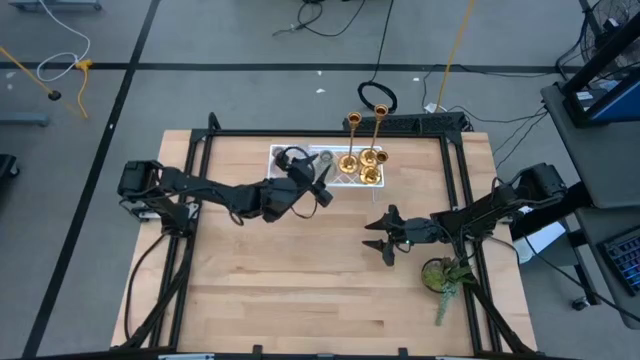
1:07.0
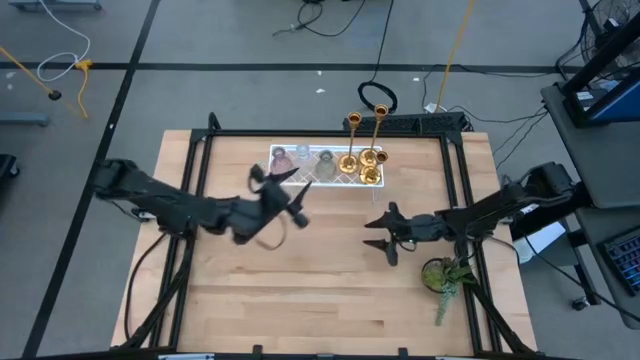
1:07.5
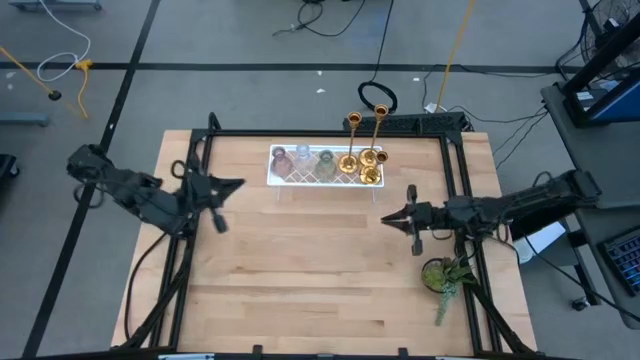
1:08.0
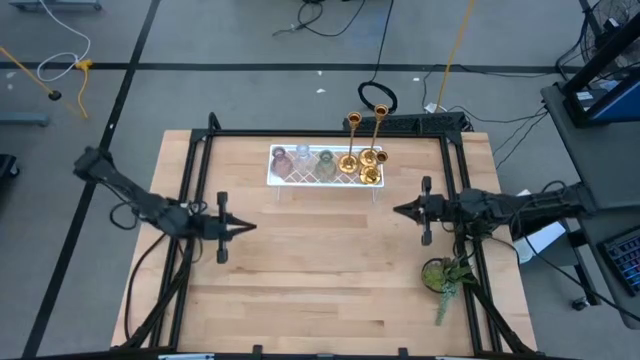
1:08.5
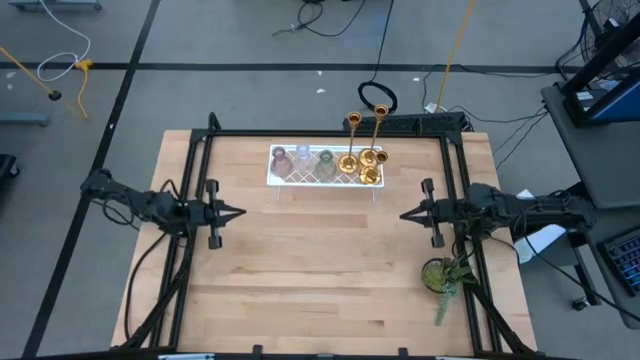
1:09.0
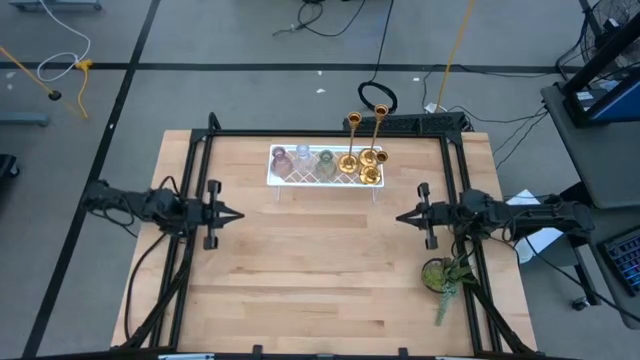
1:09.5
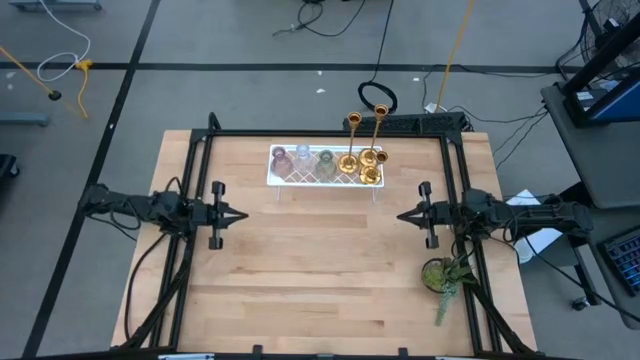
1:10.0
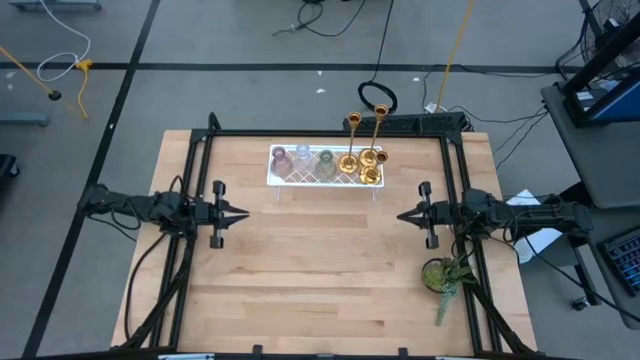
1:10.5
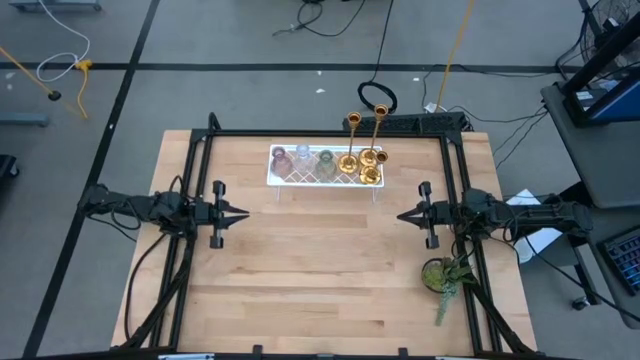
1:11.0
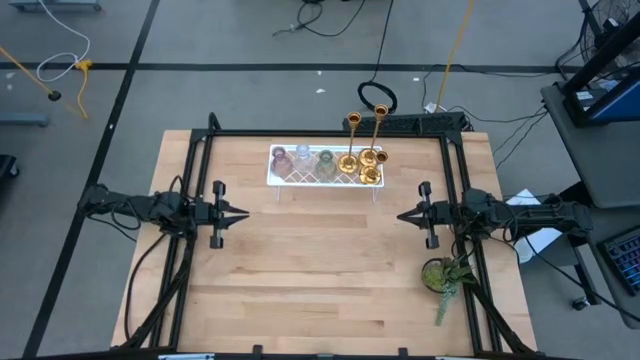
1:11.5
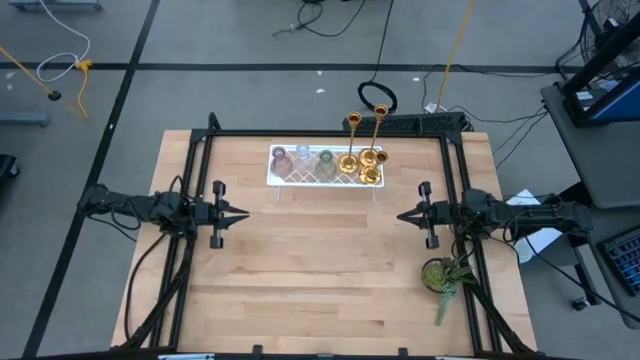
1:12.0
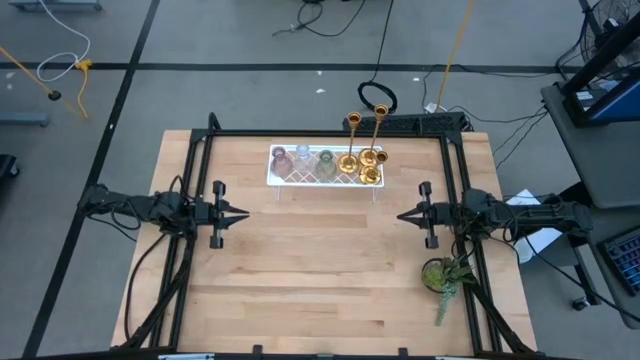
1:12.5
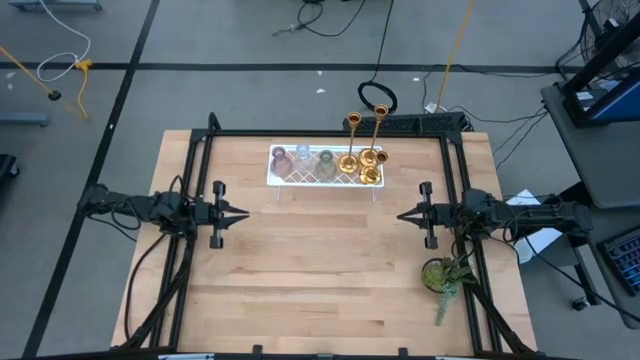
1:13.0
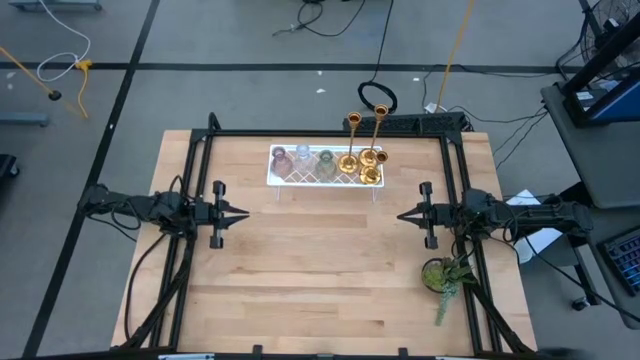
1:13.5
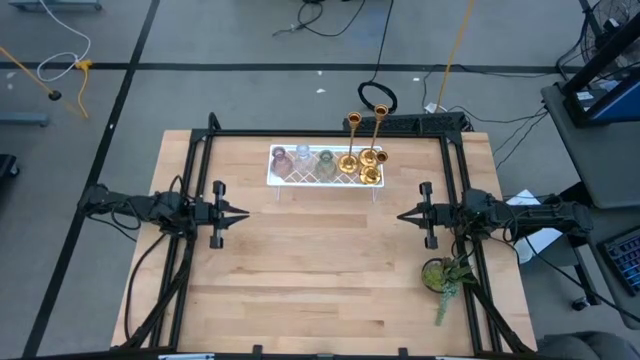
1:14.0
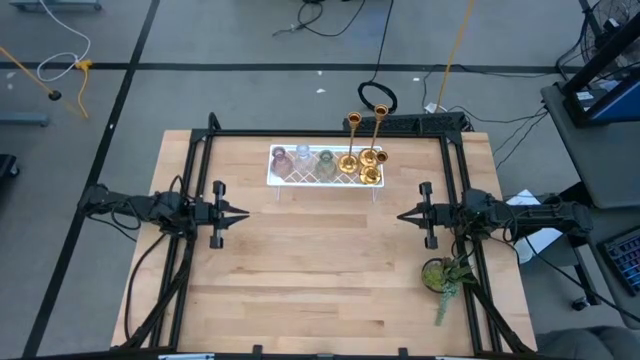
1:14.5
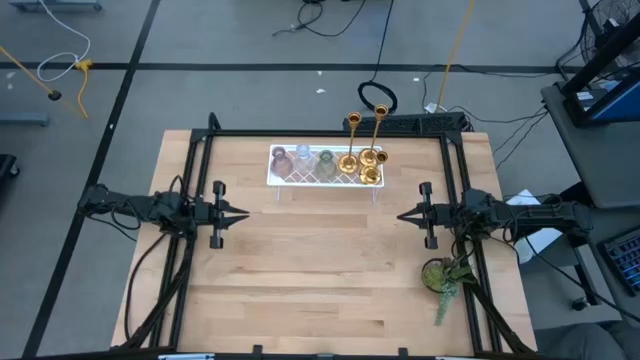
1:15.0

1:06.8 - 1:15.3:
Task: Pick & Place candle stick holders
Return to Home Position

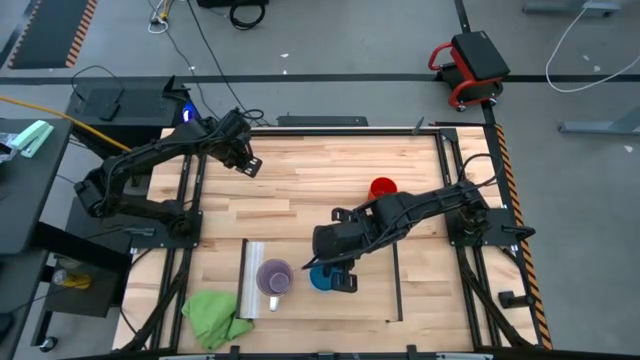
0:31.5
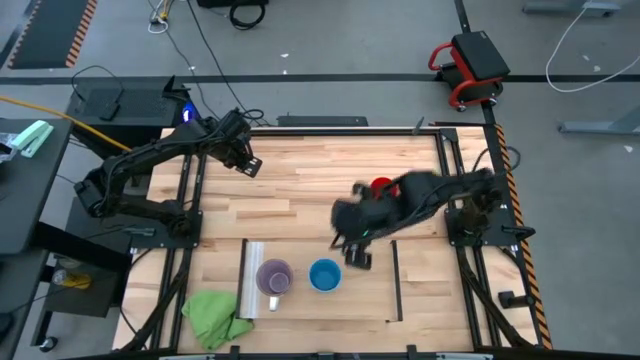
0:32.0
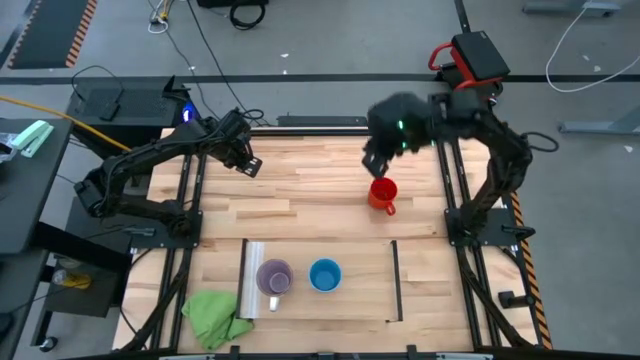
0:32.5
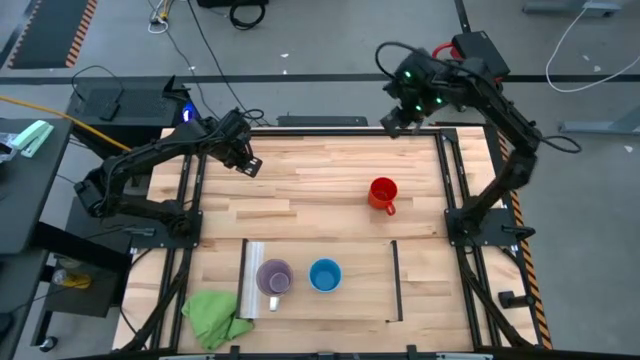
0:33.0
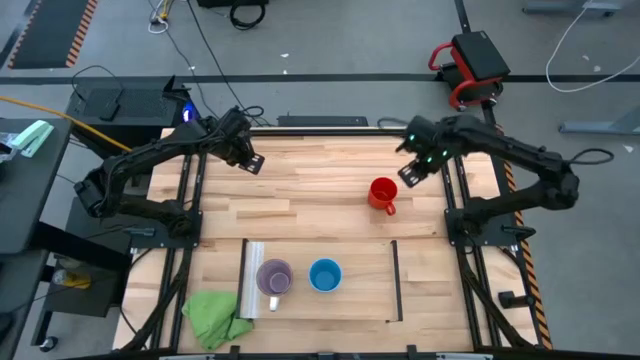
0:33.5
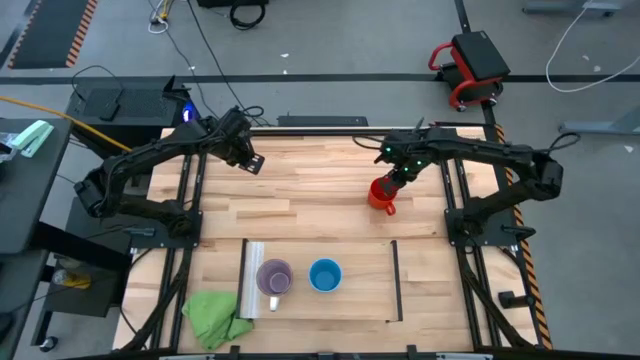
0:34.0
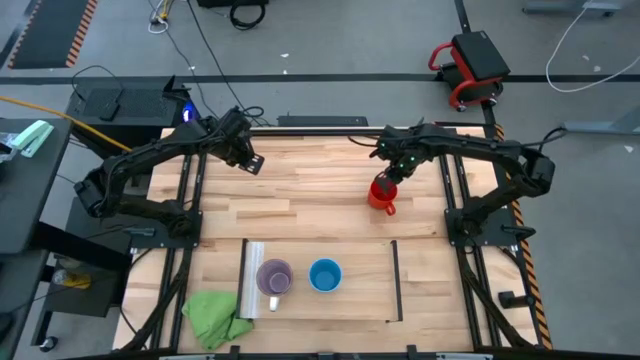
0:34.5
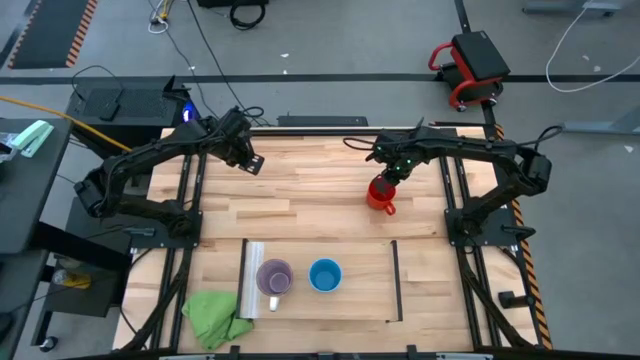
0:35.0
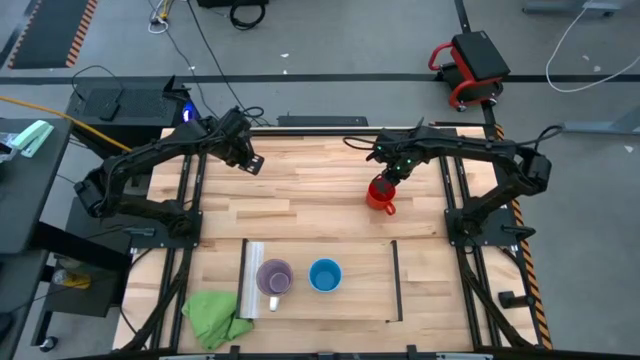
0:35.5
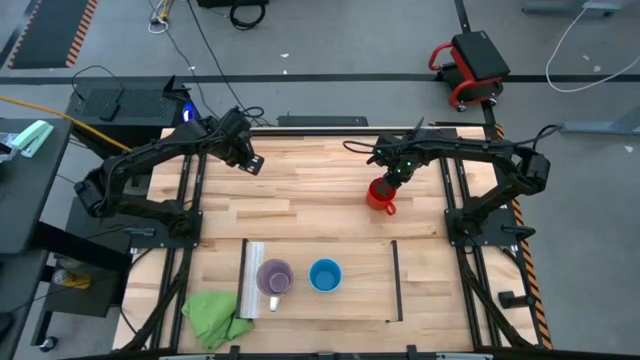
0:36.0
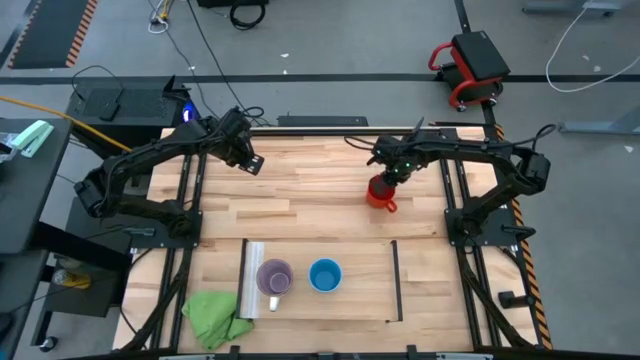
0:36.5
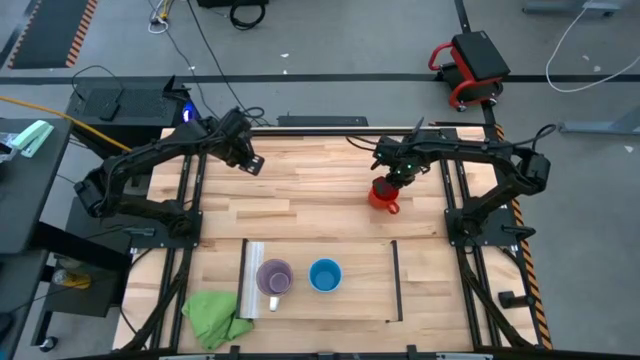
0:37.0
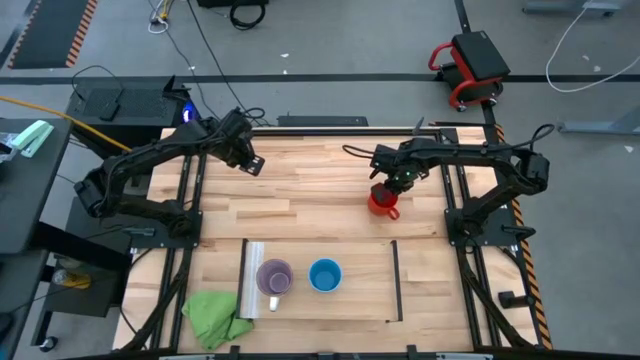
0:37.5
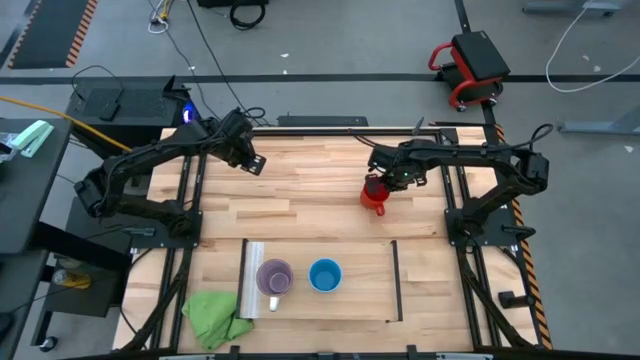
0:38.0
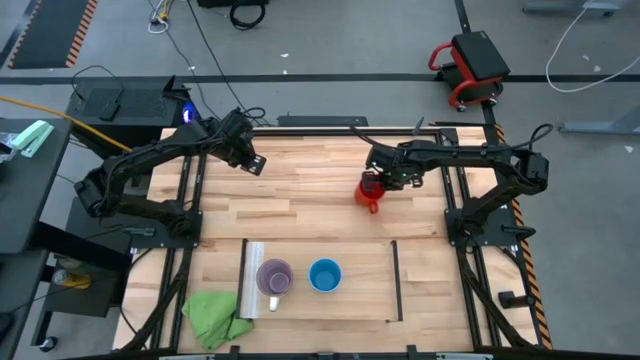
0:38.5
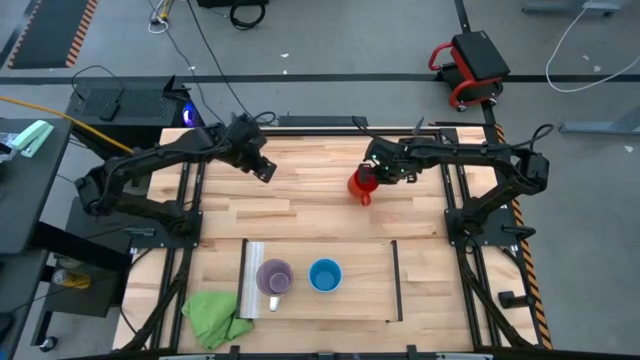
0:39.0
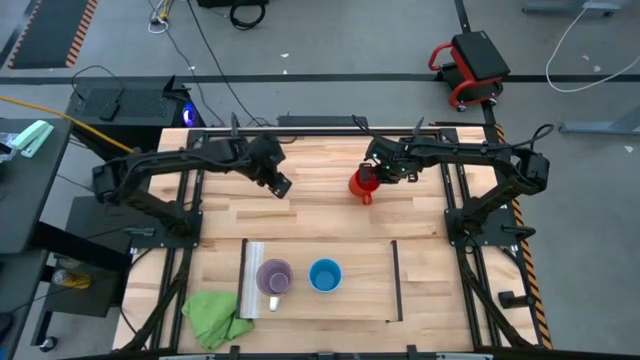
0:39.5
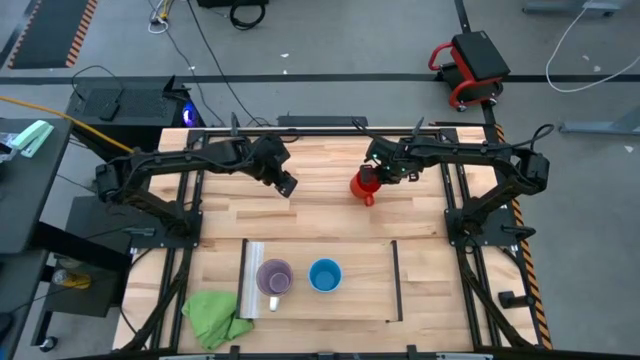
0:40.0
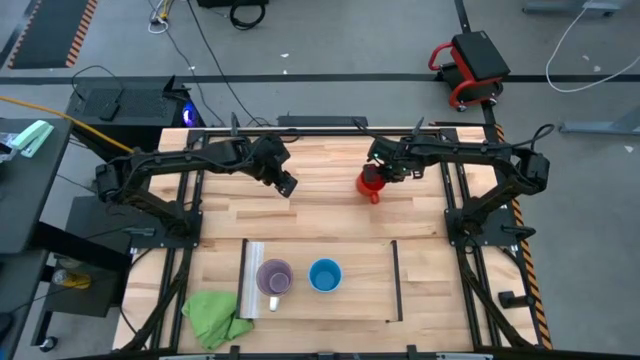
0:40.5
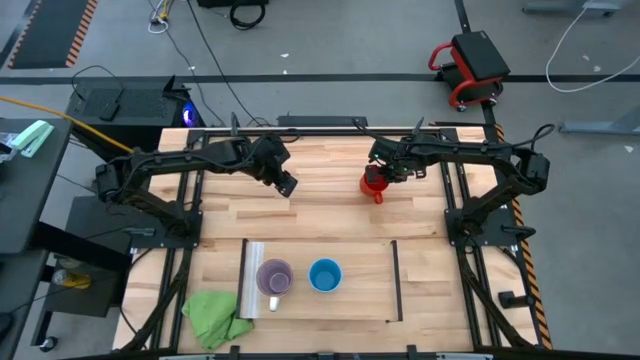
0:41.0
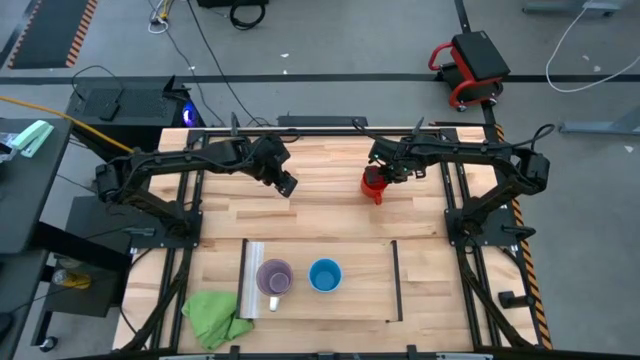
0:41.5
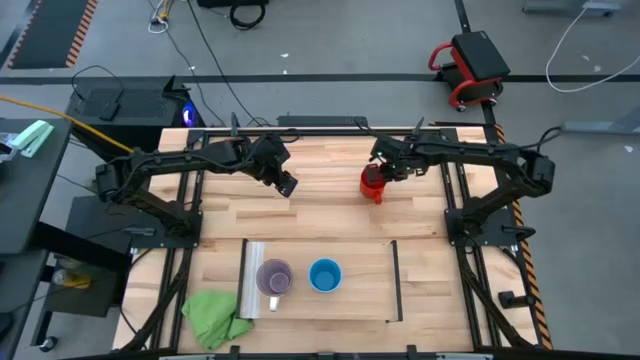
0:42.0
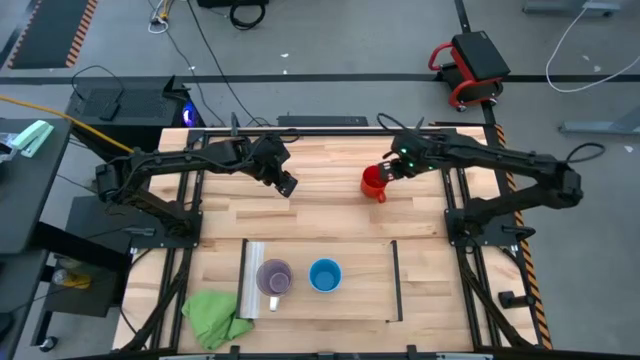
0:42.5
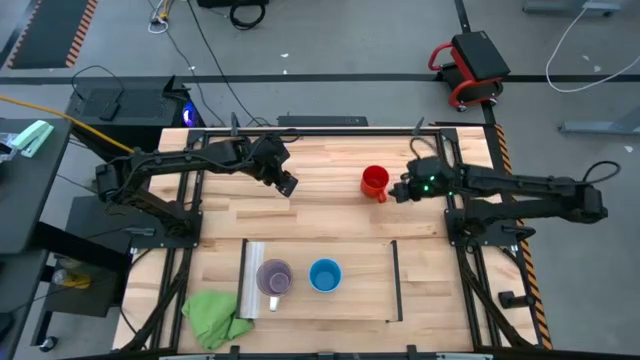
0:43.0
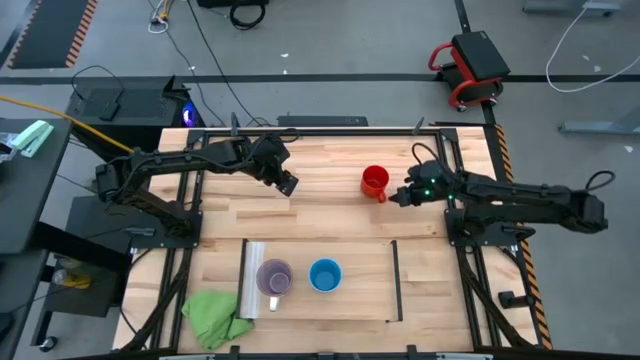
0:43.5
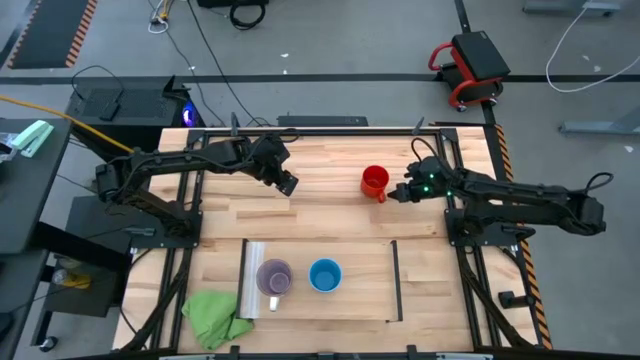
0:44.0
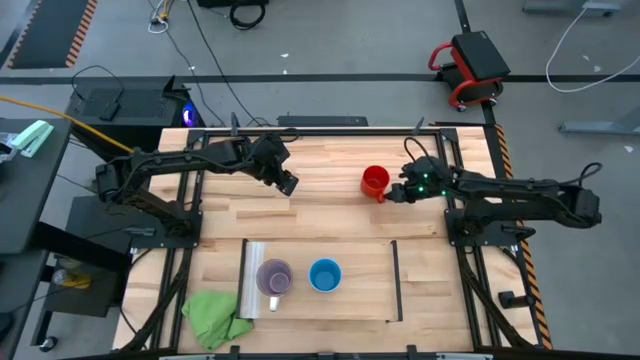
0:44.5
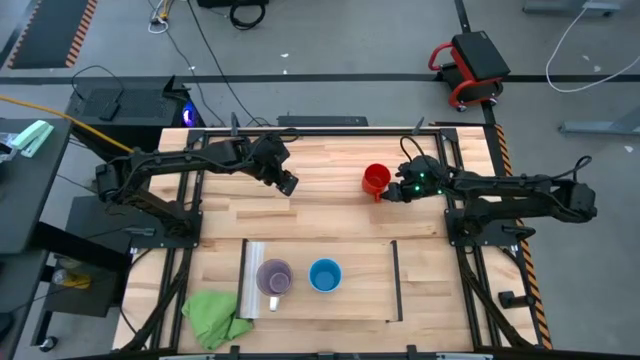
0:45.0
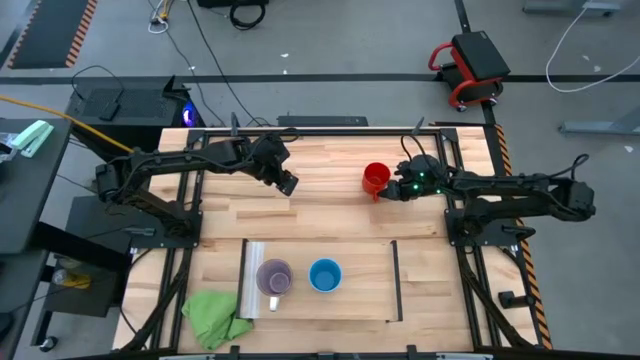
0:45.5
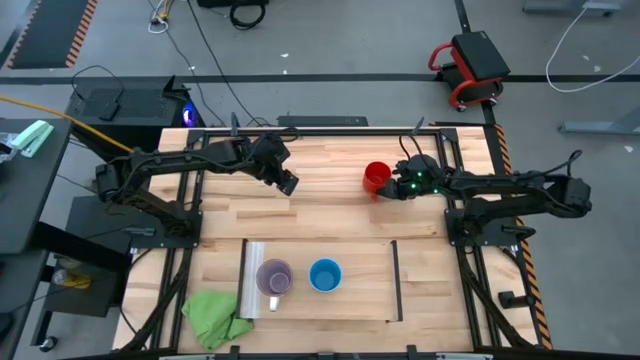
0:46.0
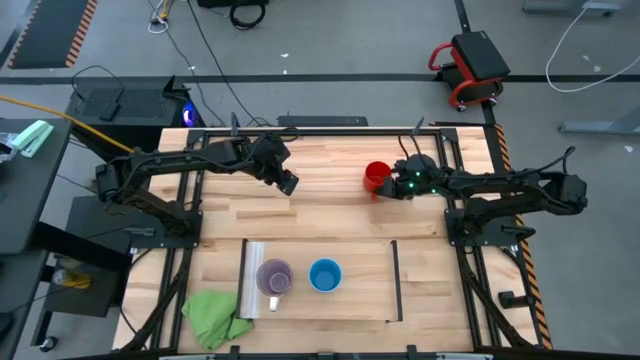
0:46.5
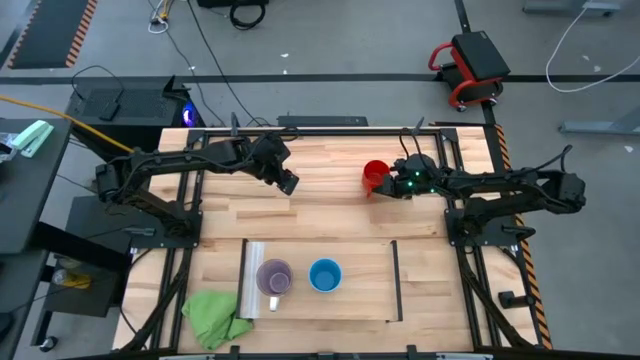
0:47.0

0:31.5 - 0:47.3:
Task: Stack small to large cups/mugs on shelf
Put the red mug on the shelf
